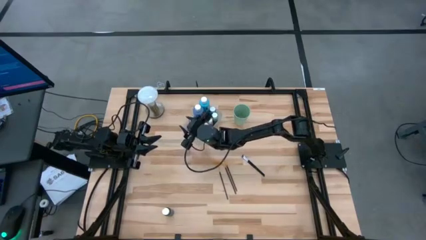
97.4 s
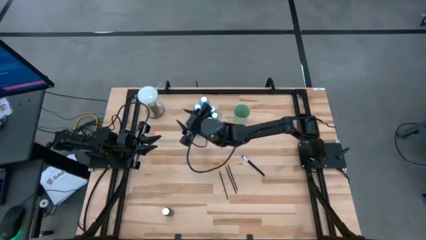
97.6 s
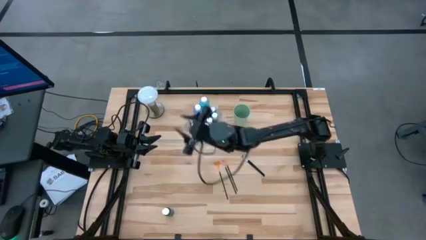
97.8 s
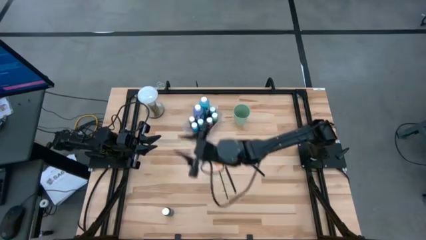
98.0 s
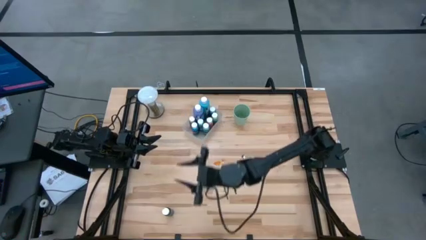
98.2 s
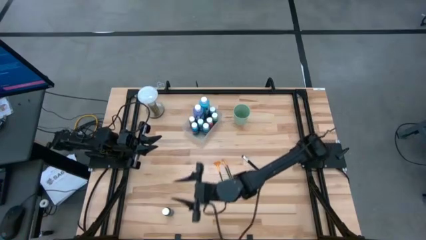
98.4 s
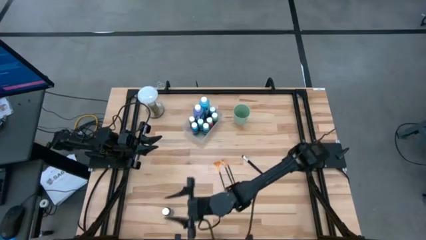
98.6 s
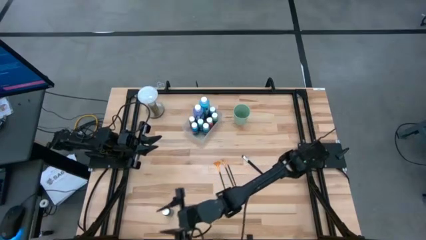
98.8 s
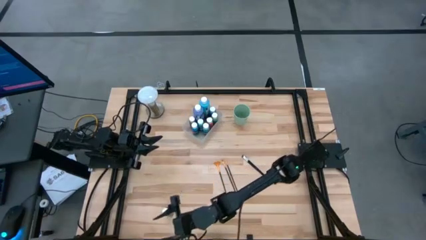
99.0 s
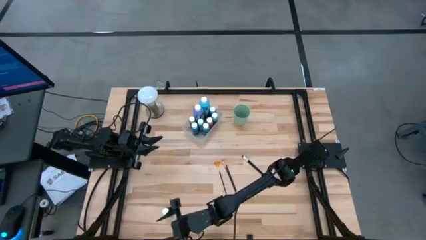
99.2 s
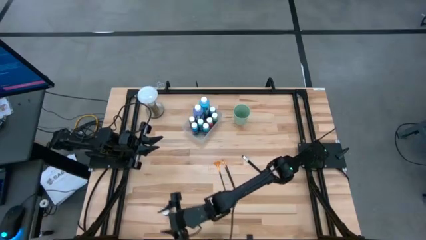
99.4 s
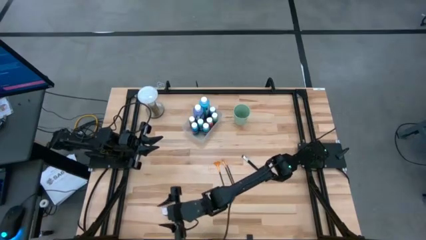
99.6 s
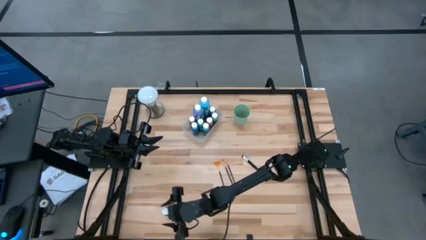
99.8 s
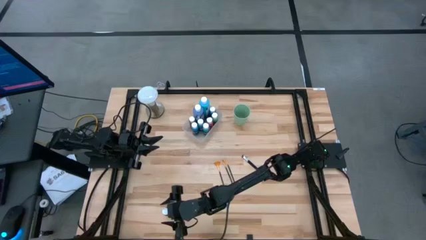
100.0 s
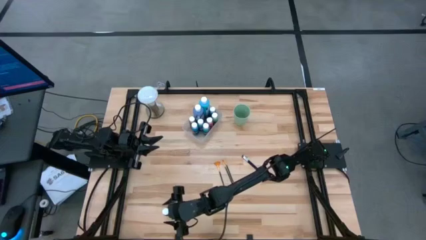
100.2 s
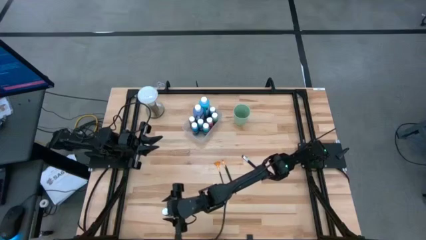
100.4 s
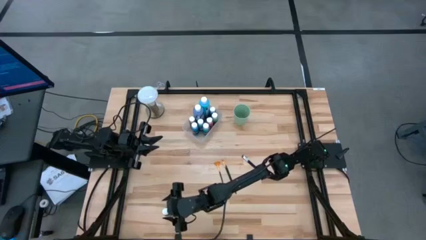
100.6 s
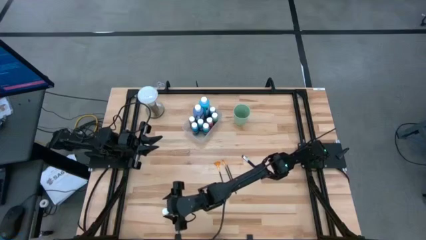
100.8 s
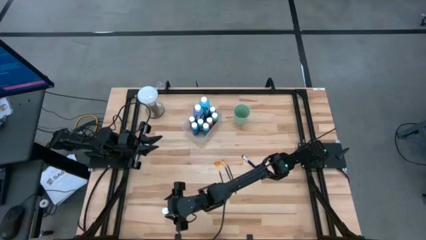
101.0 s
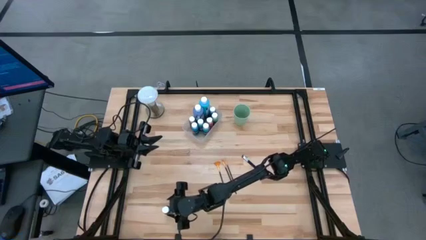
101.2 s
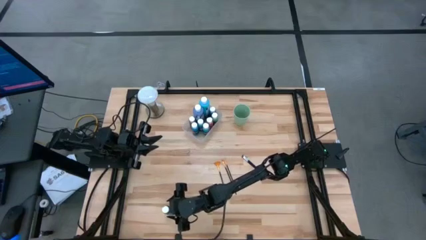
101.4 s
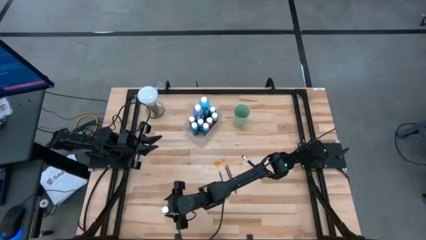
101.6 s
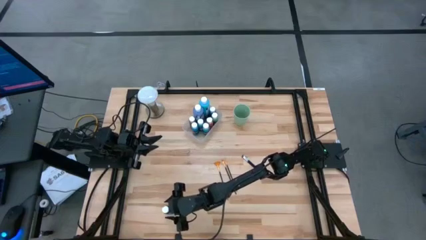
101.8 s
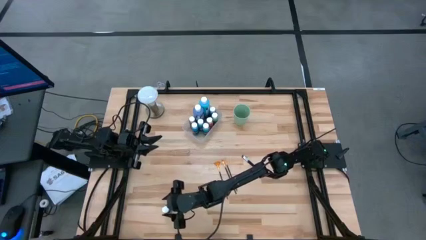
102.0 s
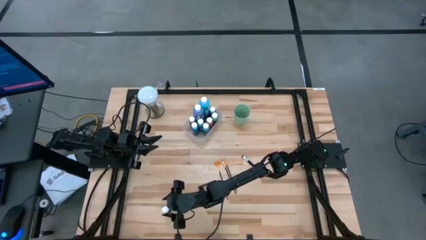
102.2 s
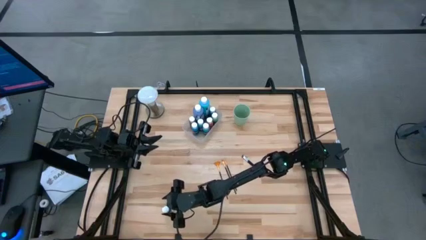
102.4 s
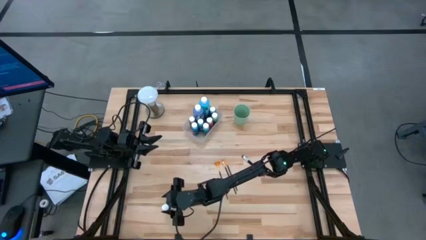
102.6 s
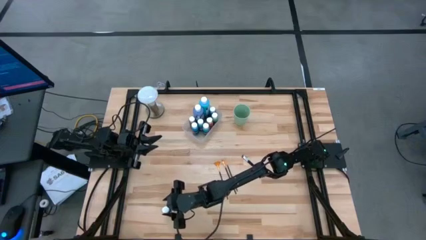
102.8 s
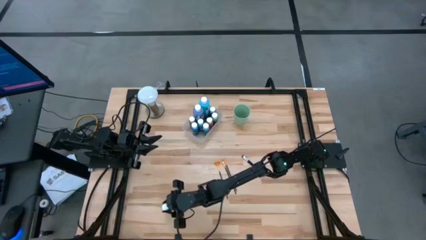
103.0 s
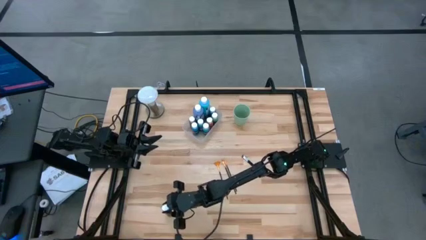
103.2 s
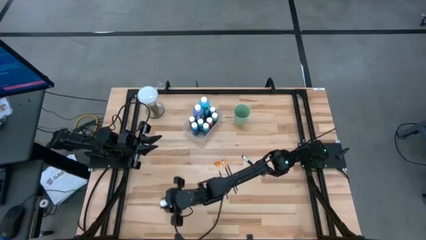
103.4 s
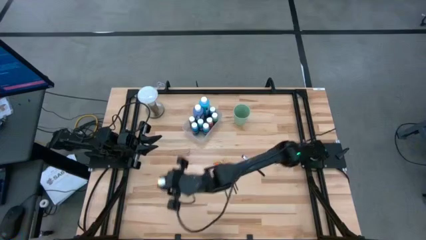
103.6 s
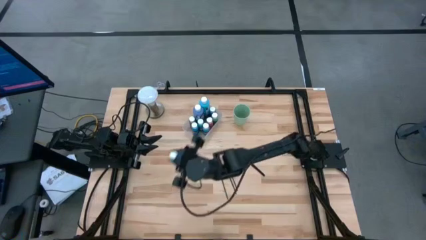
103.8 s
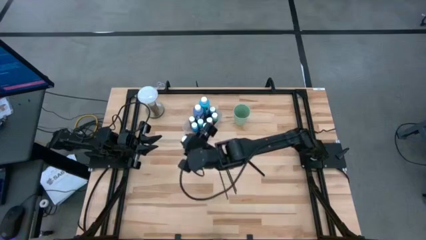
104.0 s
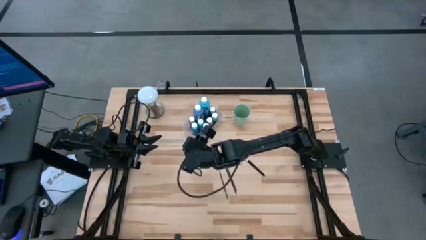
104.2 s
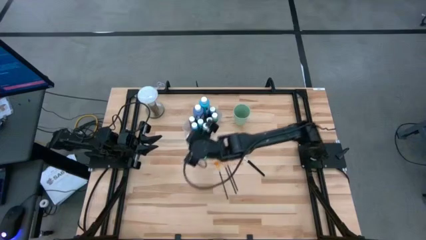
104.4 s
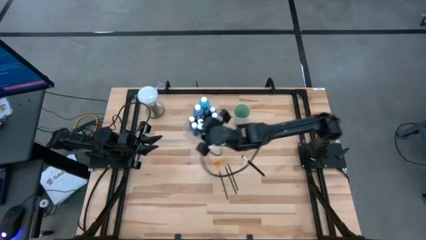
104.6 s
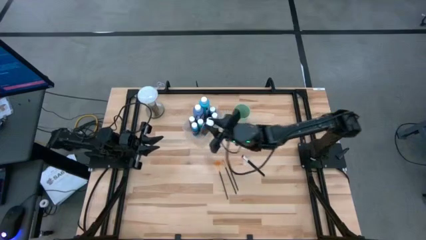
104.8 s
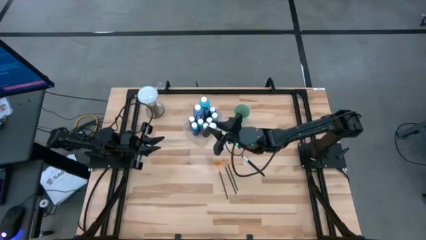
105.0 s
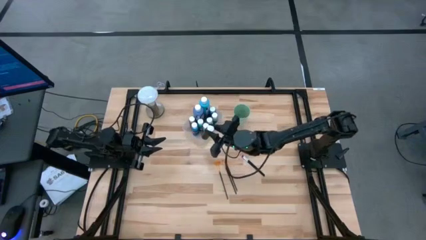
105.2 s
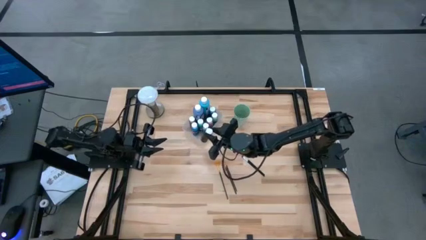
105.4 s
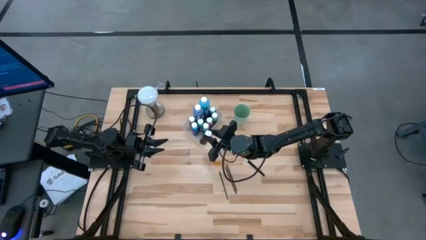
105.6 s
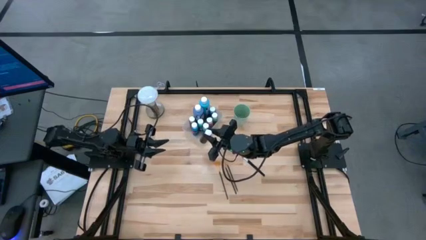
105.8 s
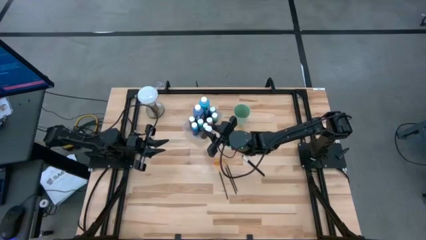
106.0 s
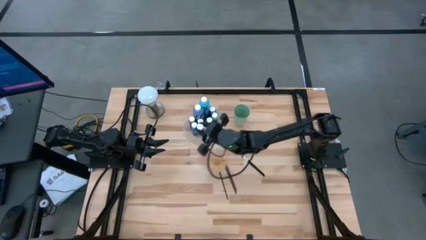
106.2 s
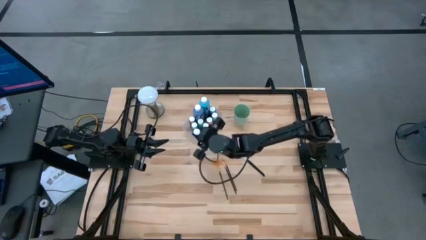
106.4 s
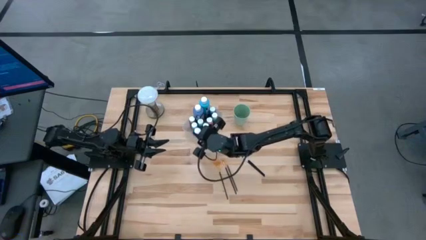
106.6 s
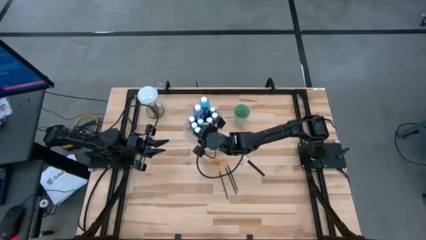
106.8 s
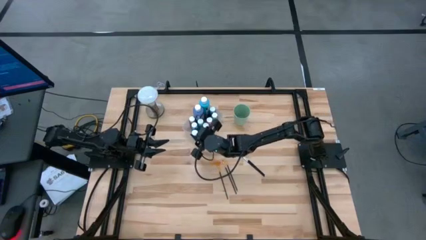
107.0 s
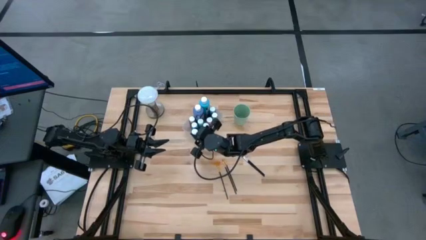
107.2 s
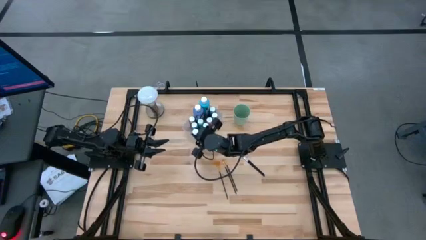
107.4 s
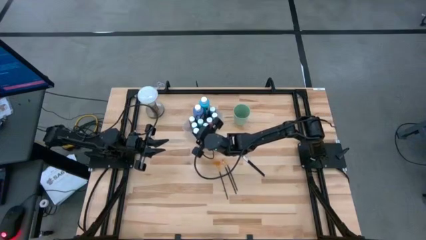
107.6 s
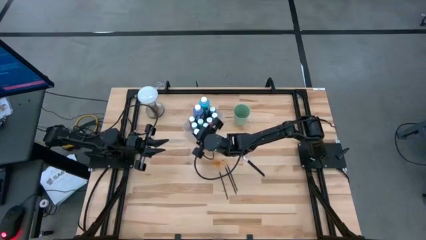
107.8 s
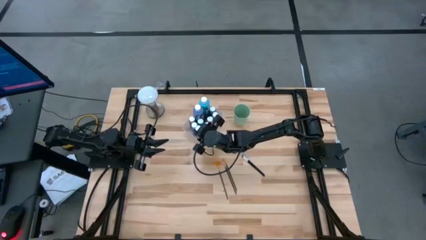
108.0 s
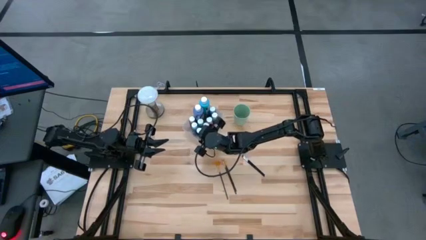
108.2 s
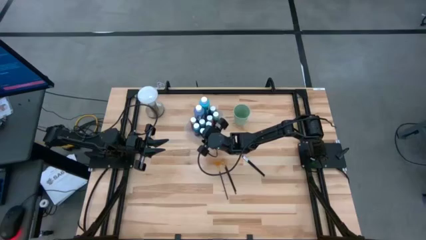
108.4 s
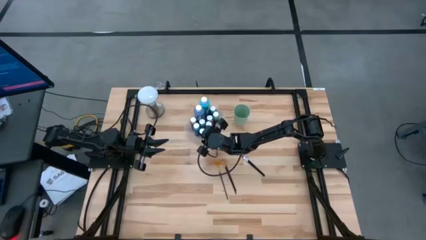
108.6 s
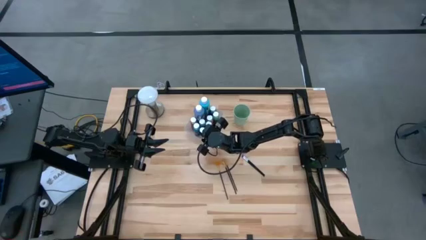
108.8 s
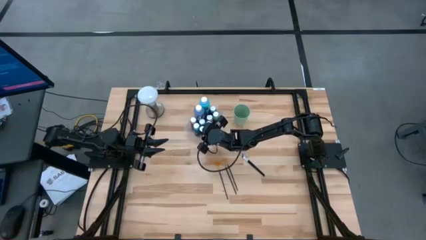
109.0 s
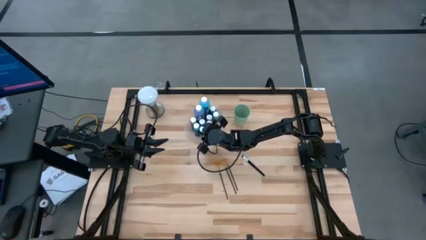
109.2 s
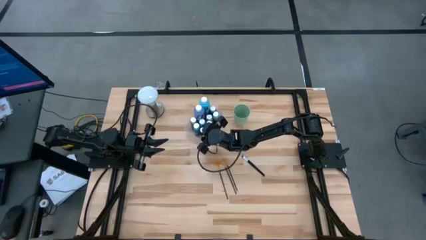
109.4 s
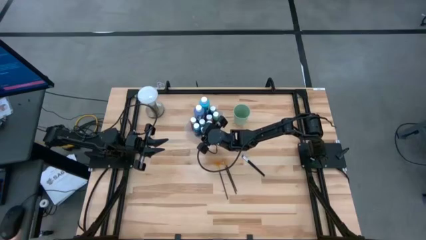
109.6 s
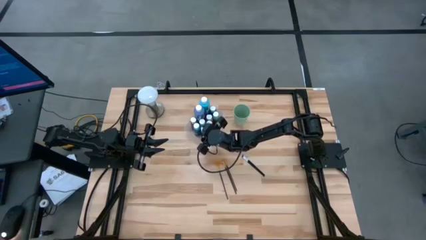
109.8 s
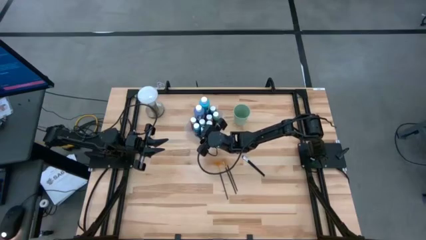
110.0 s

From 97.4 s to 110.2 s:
Task: Pick & Place Paint Supplies
Put the small black paint bottle into the transparent bin

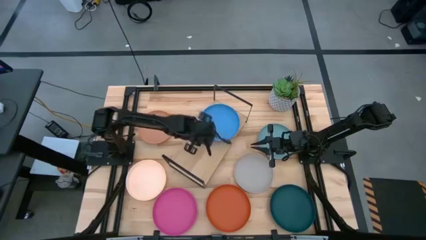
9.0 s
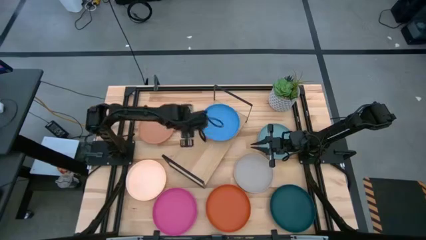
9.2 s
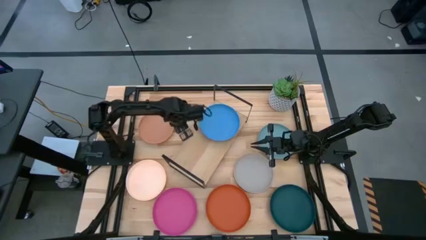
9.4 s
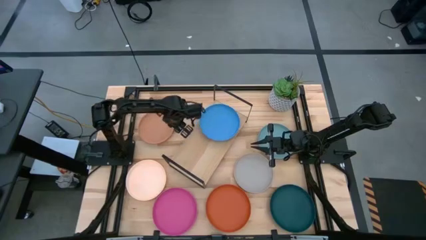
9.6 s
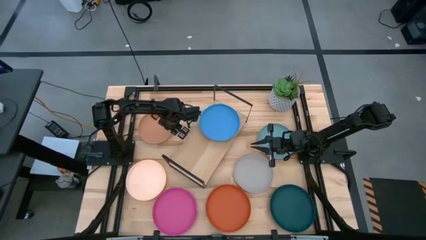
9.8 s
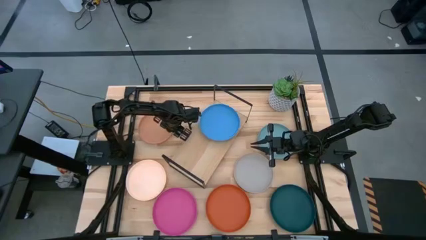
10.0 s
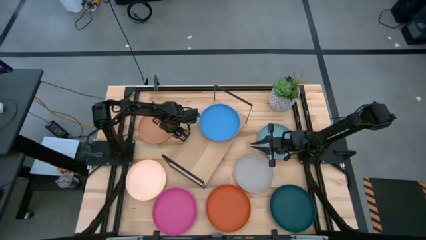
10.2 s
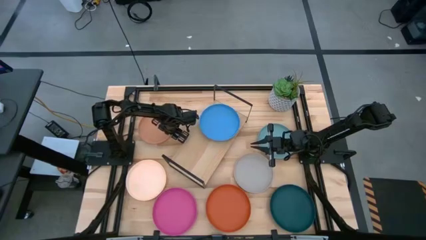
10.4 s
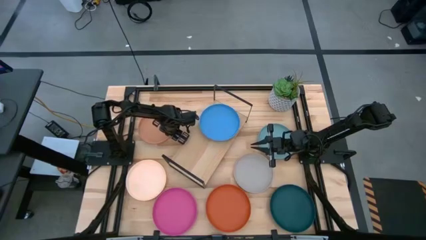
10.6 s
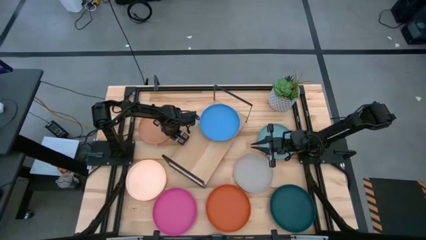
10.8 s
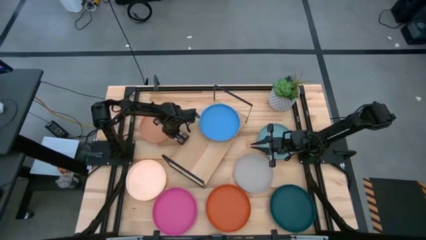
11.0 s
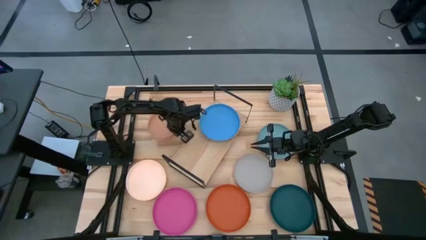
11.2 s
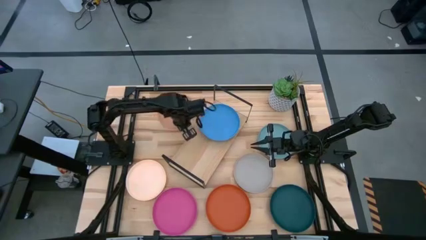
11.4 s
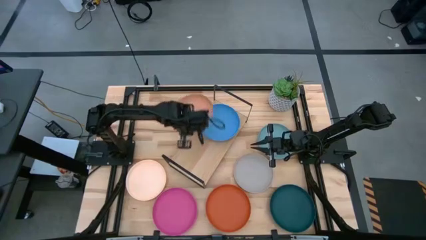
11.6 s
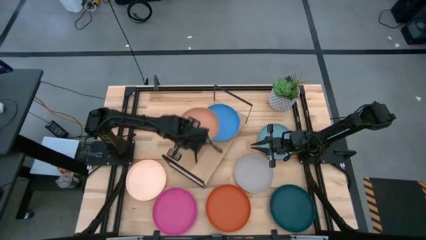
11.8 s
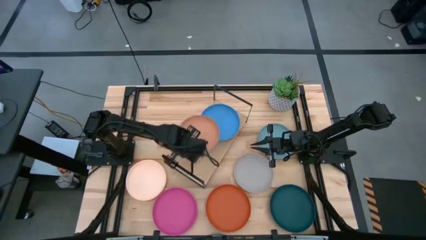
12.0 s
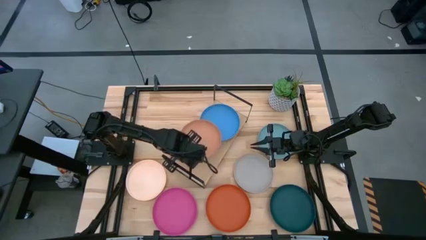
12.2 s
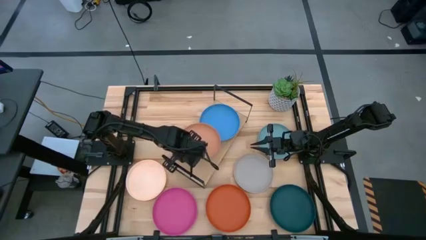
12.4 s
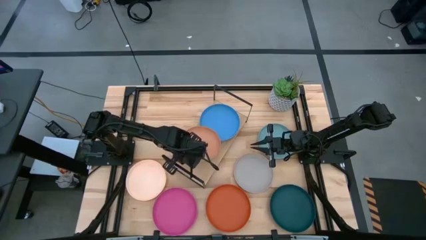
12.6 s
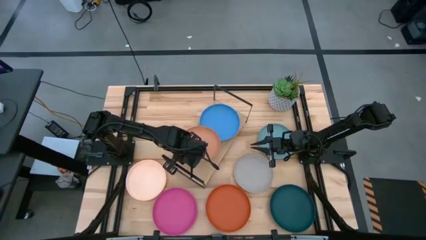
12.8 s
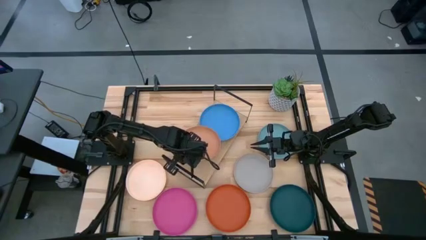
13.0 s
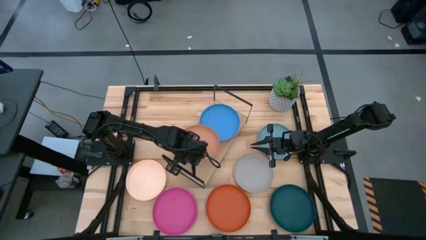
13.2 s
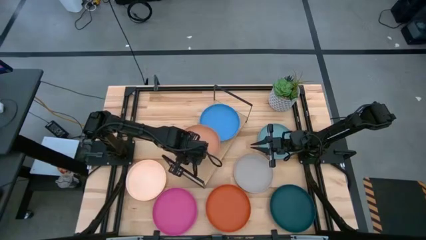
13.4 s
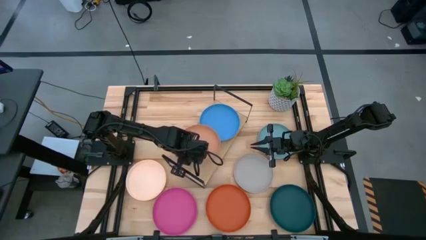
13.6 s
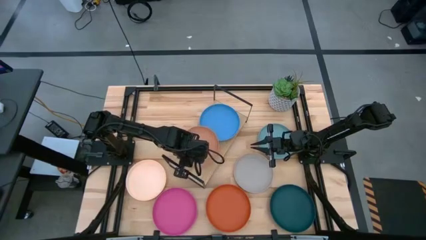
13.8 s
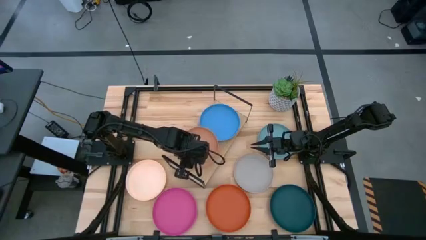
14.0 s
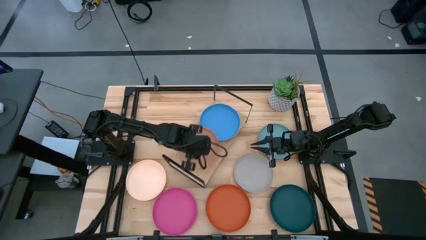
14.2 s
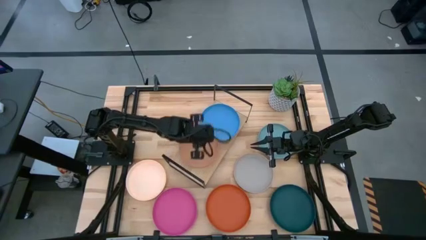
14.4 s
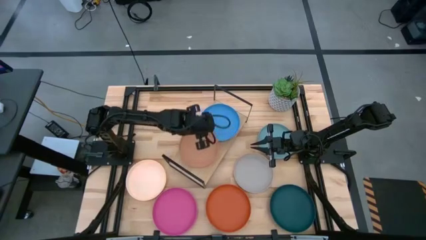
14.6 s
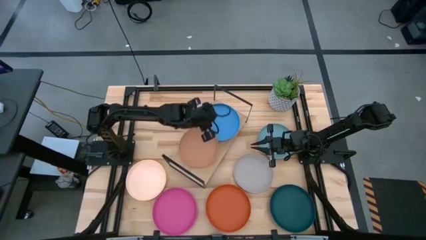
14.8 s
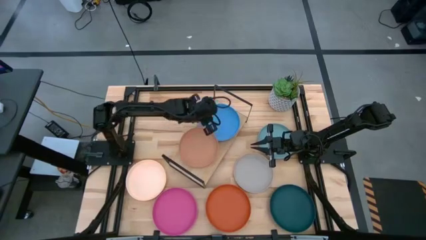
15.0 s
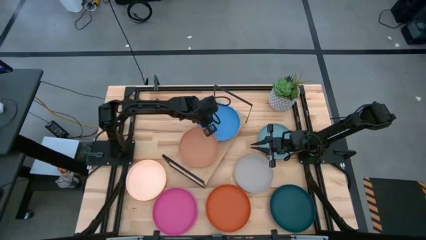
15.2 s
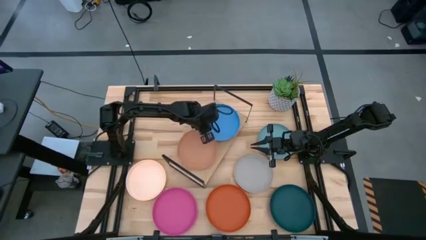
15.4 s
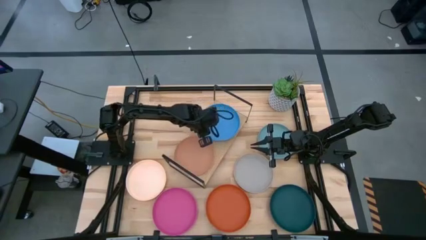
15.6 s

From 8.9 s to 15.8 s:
Task: Place and stack plates onto a shelf
Put the brown plate on the shelf
